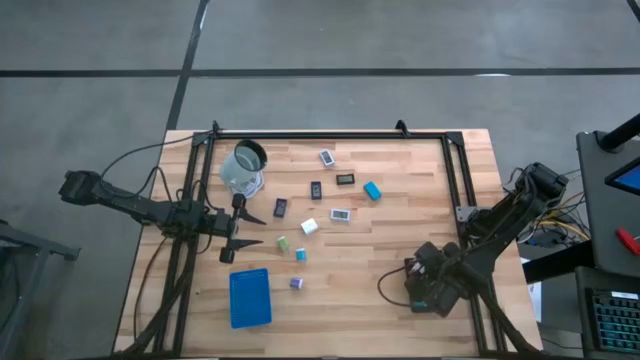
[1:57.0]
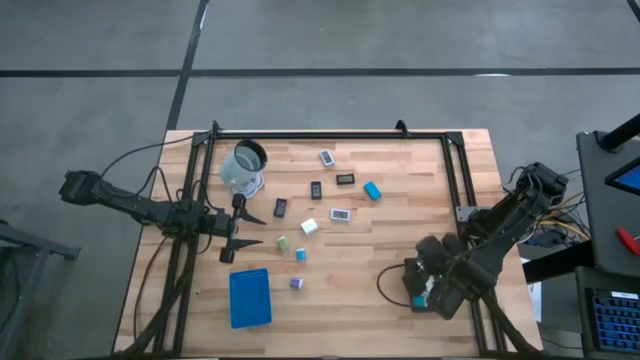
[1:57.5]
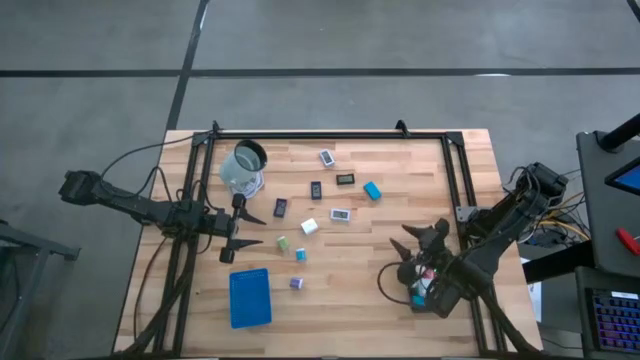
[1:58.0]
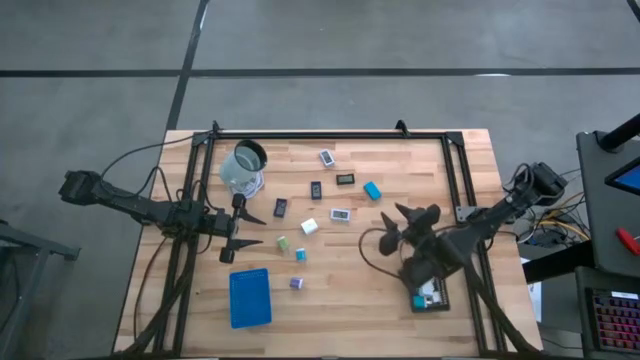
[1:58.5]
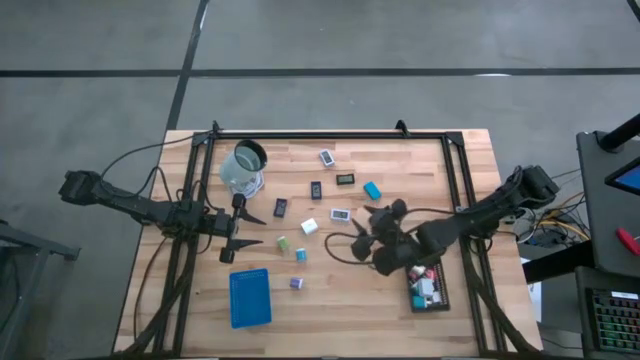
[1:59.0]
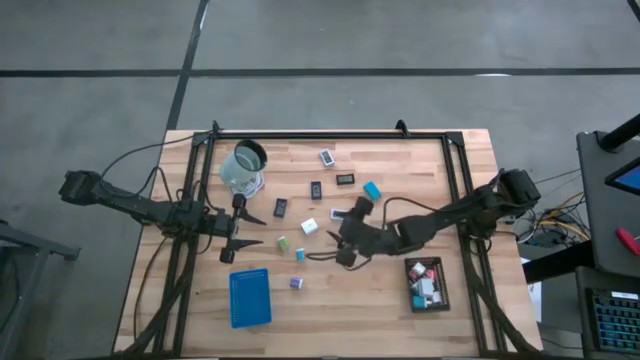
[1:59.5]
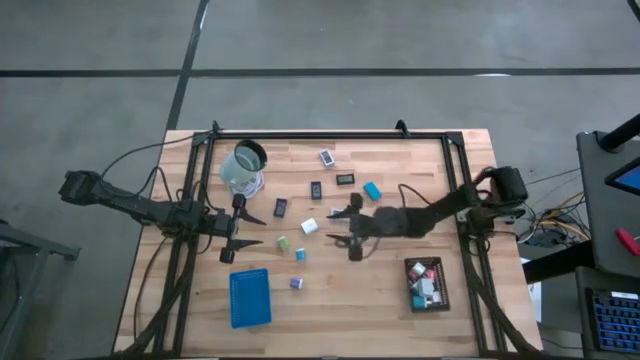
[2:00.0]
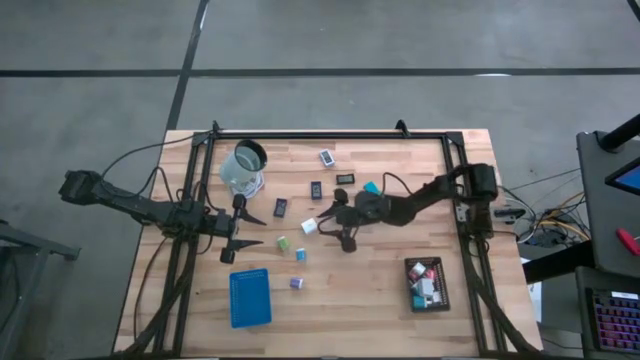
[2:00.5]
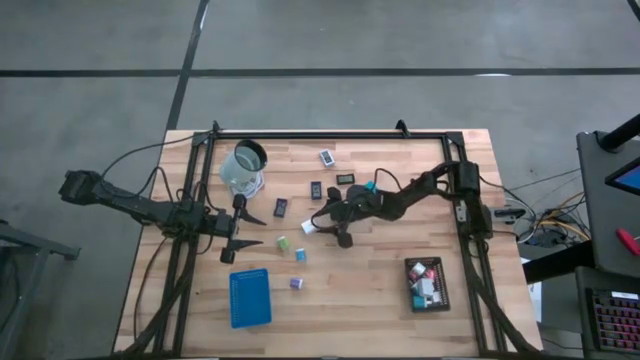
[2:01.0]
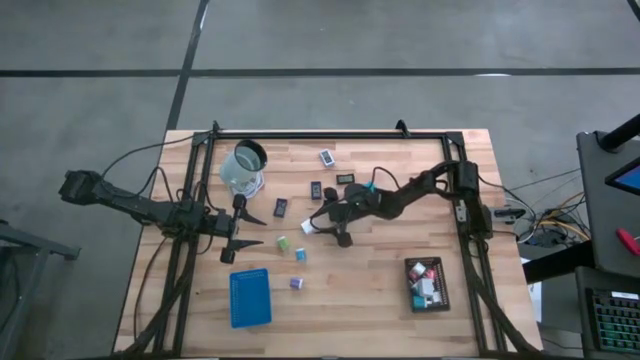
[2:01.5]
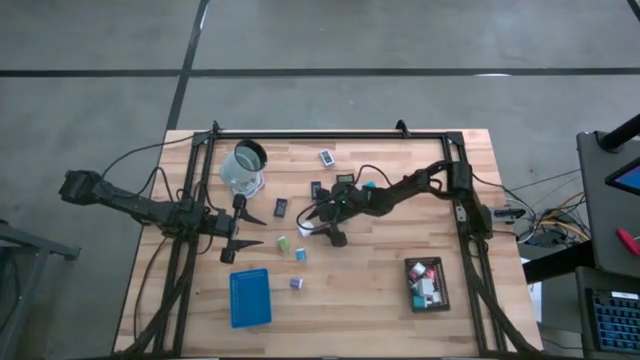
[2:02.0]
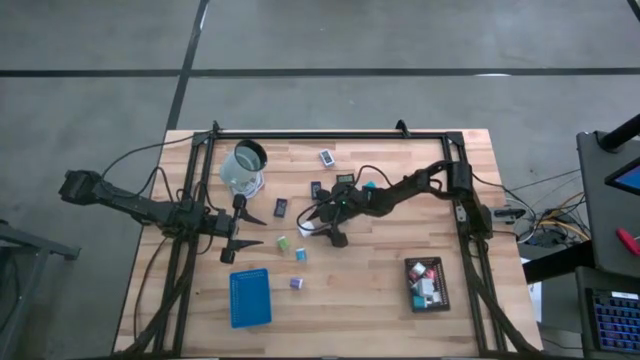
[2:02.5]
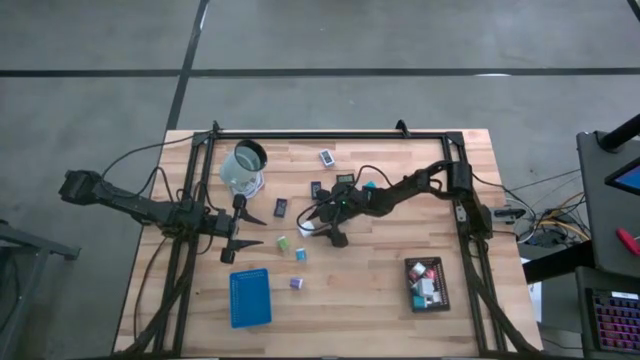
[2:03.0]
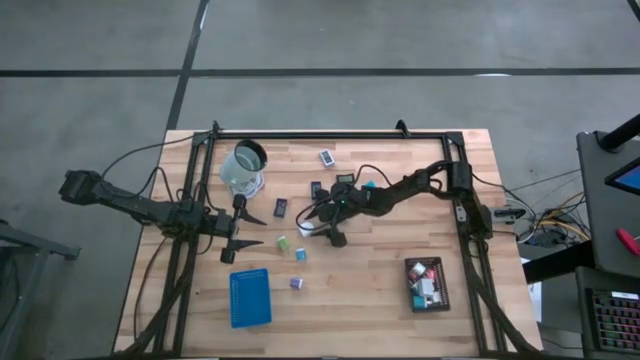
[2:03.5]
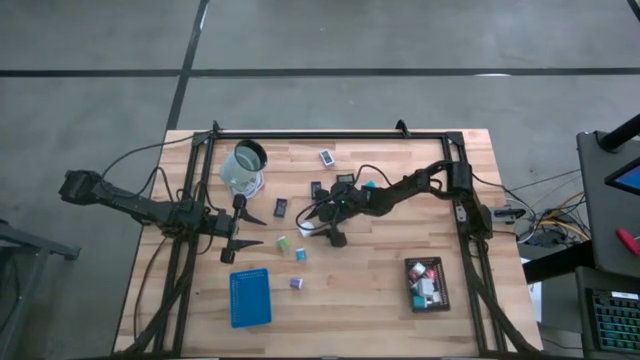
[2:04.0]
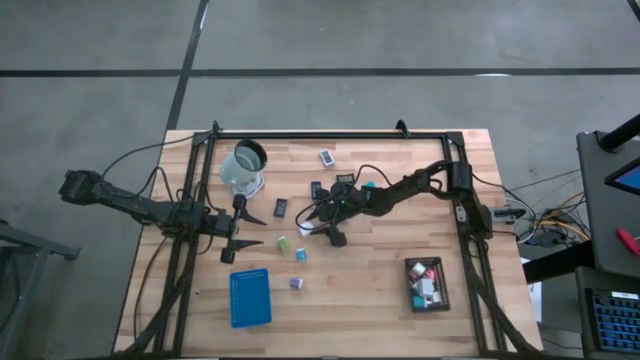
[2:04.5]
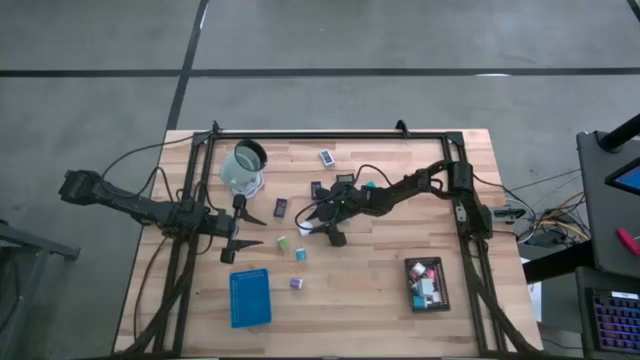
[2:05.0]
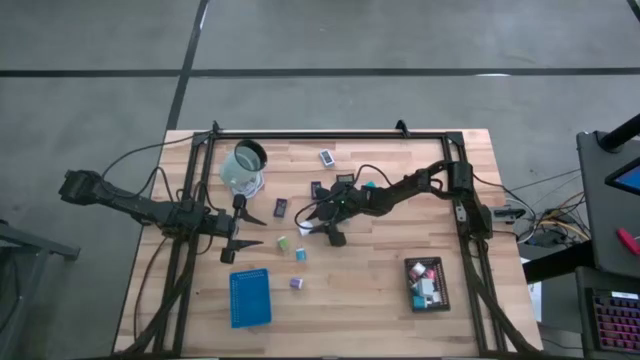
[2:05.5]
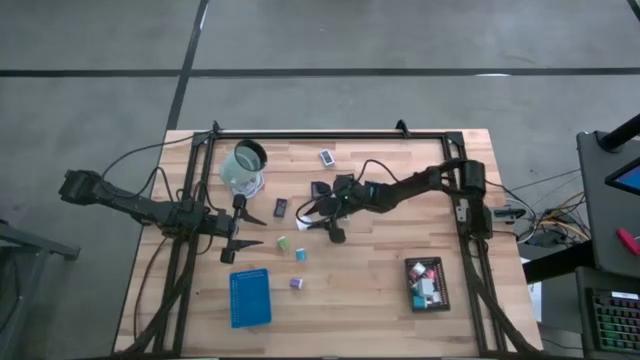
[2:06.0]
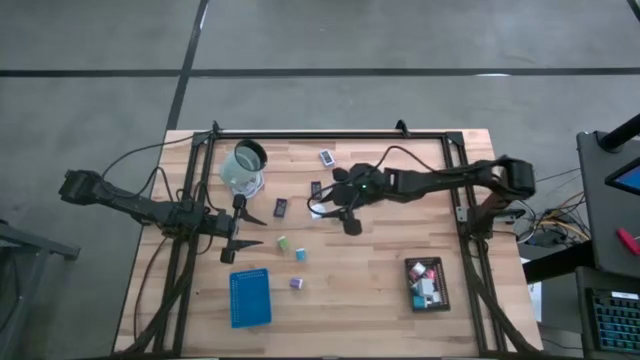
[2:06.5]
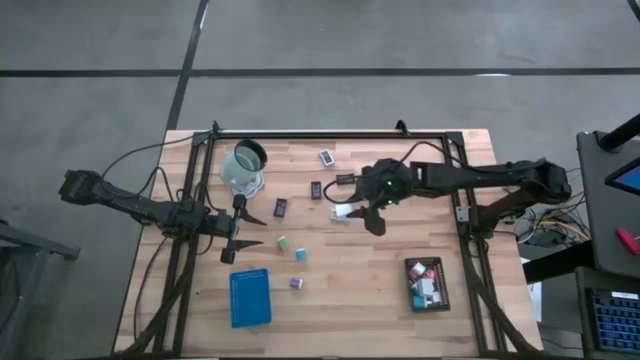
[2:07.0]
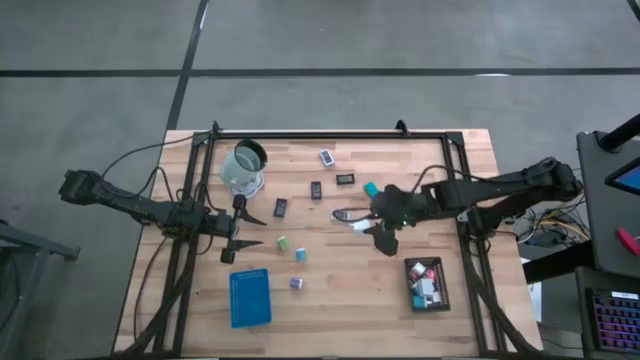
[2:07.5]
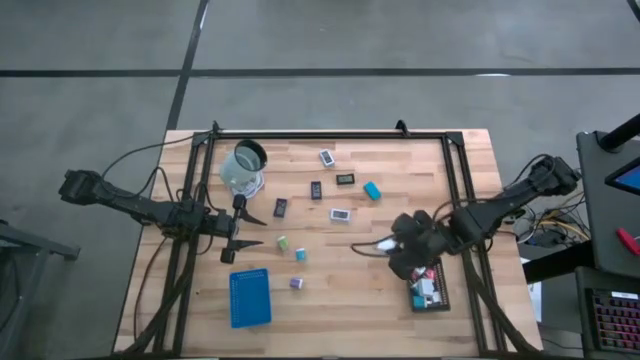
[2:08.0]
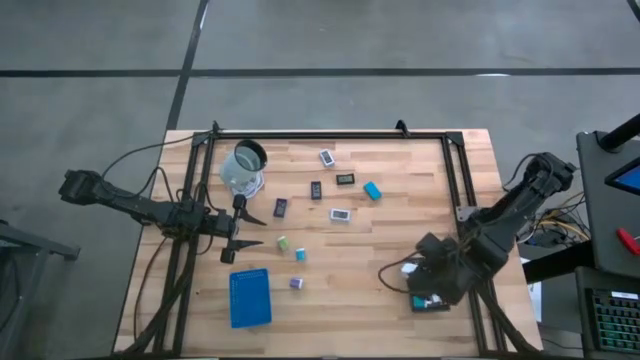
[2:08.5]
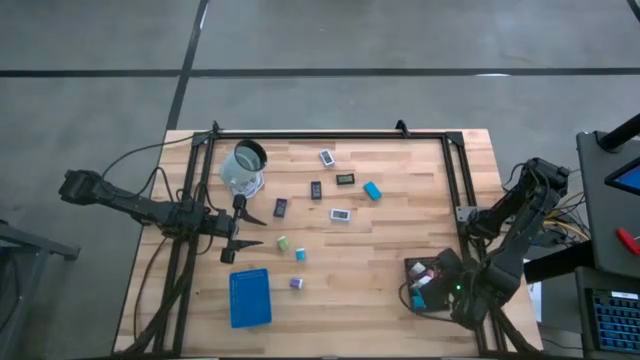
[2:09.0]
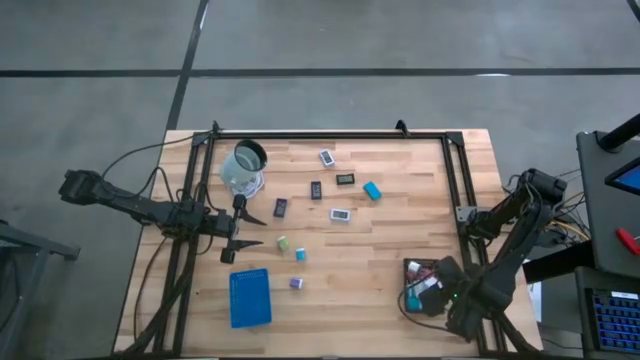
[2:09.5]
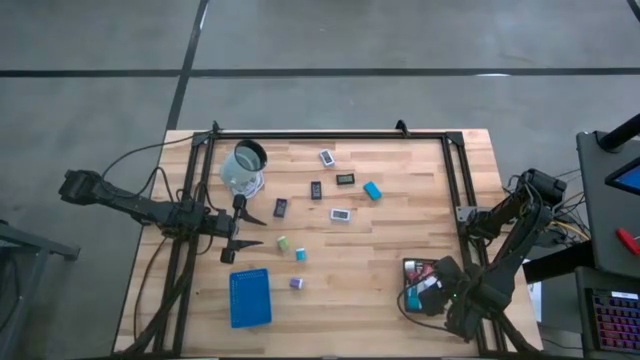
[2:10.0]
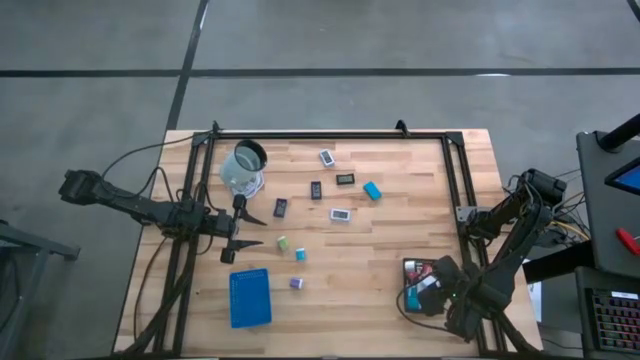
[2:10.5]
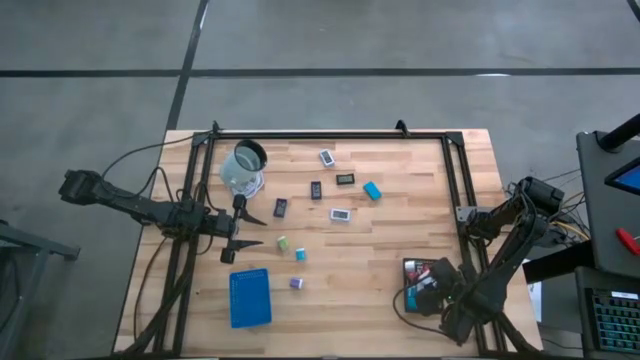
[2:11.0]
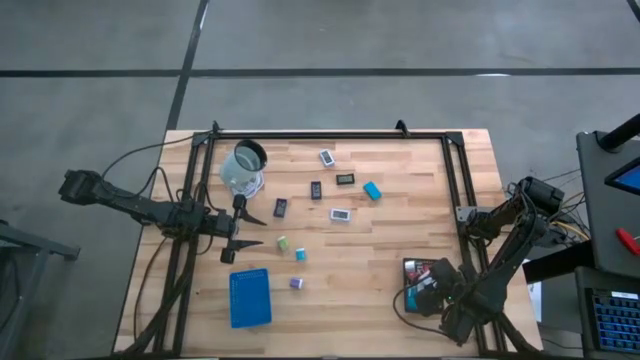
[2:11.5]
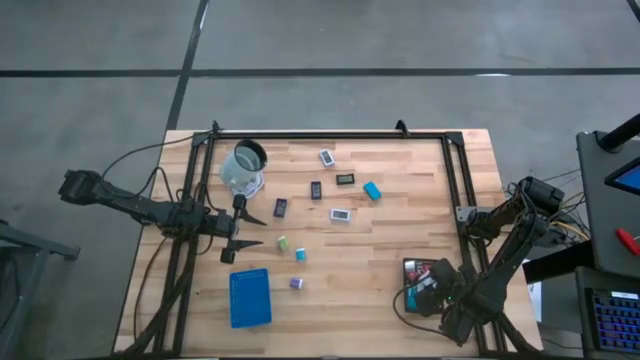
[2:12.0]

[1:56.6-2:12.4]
Task: Pick & Place Office items
Put the white charger adapter into the black bin

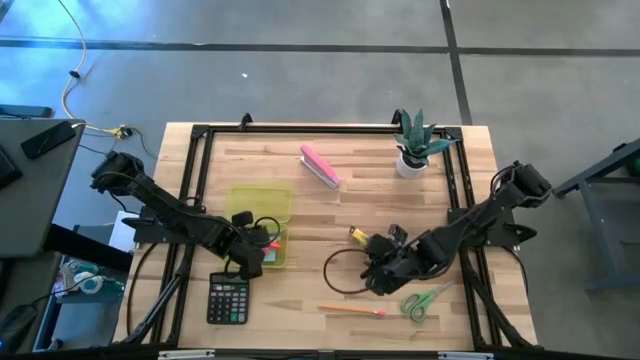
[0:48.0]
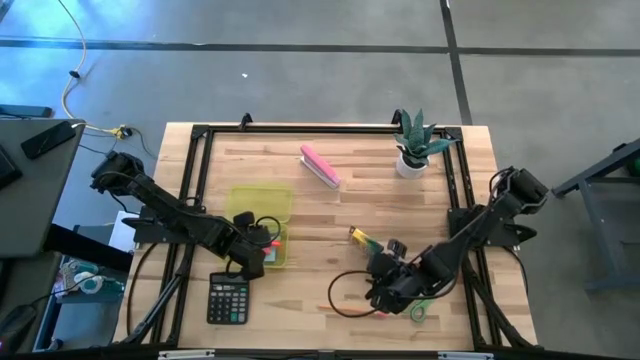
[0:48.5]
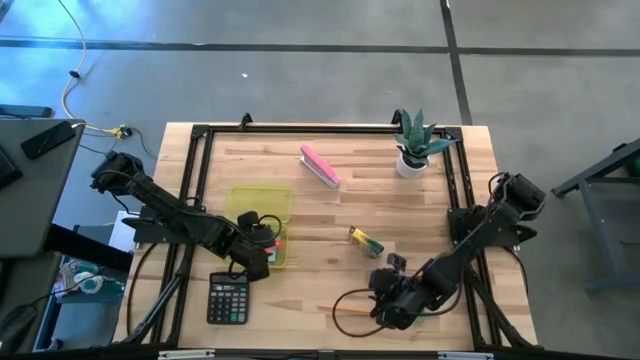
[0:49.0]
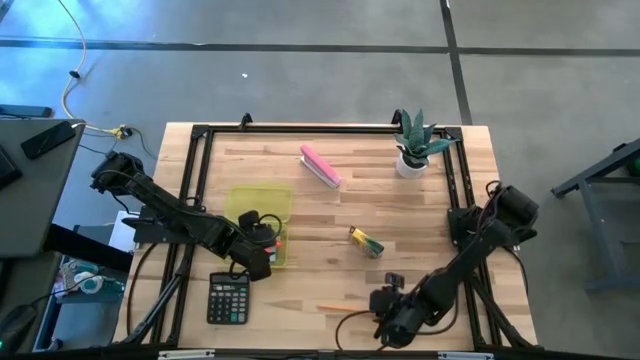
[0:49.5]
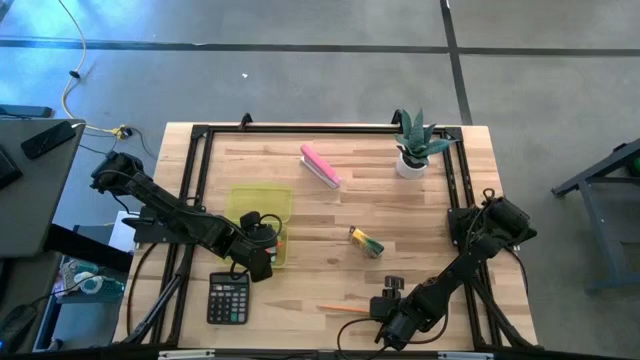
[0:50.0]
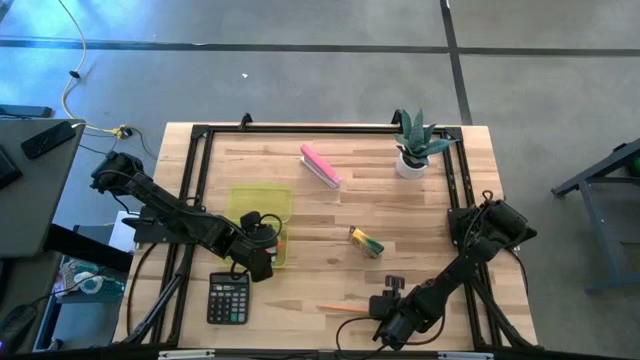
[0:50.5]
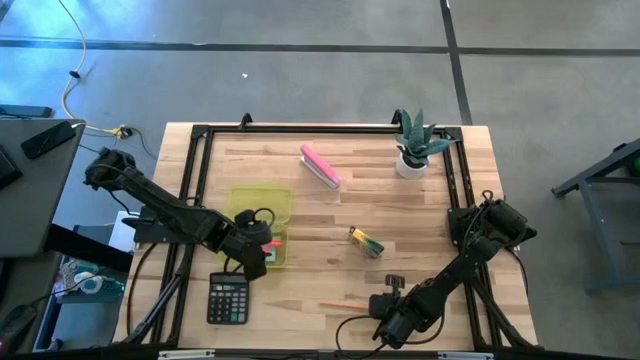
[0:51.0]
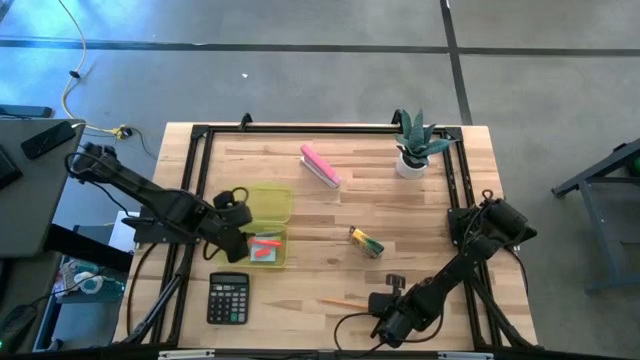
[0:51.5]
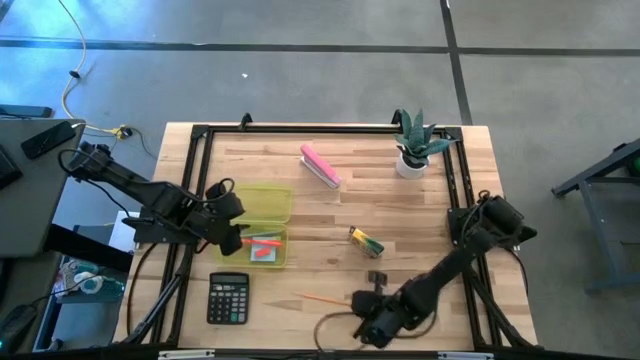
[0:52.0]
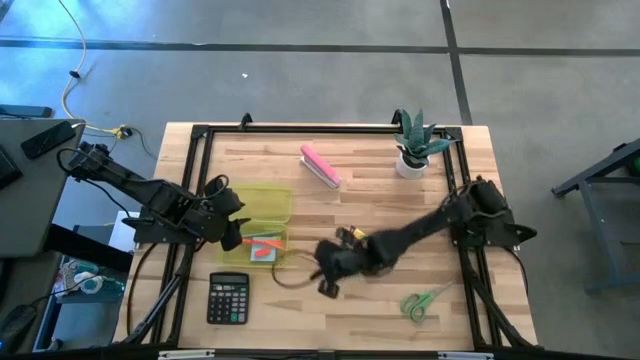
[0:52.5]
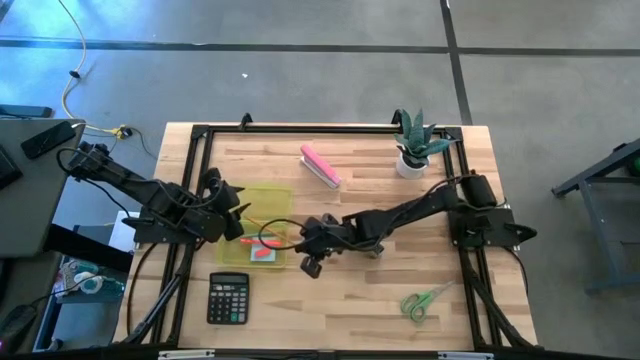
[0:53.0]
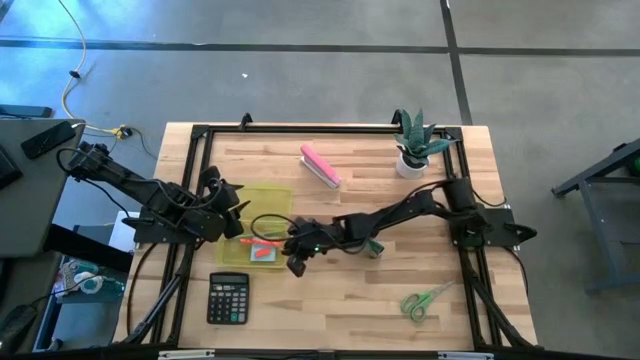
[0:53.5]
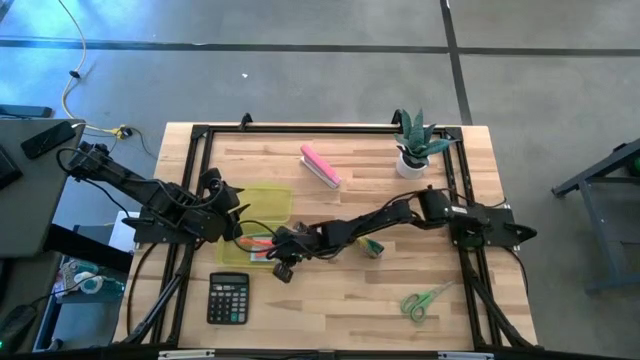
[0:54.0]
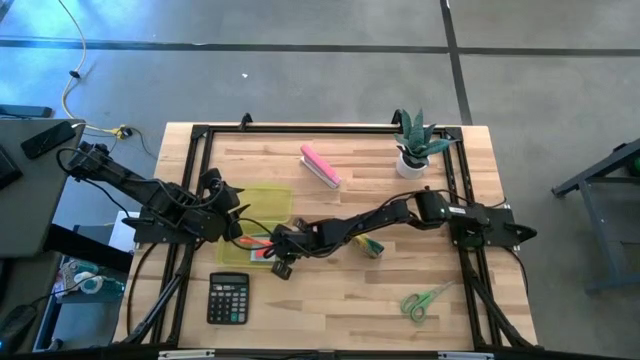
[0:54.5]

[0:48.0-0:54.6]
Task: Pack school essentials
Put the yellow pencil into the yellow supply box
